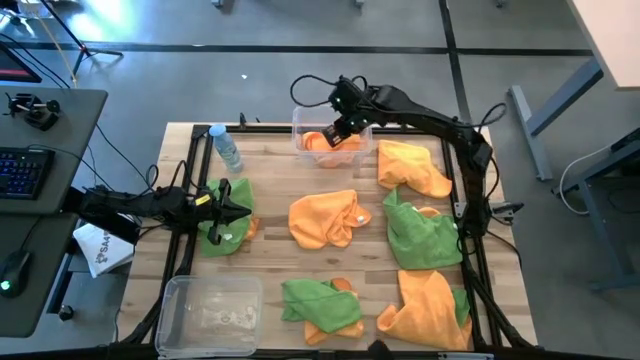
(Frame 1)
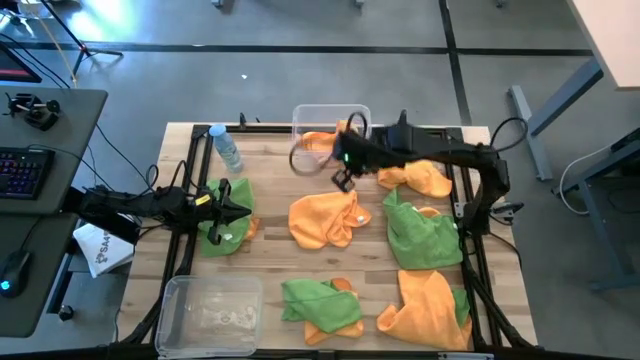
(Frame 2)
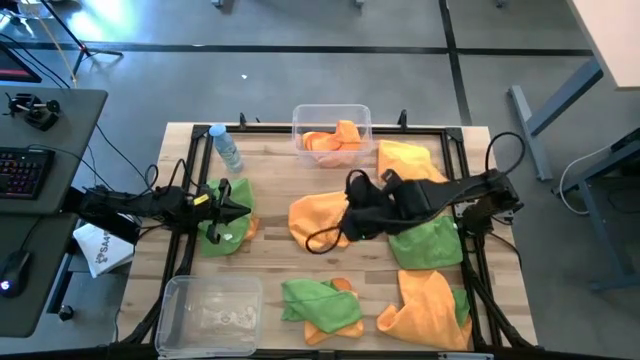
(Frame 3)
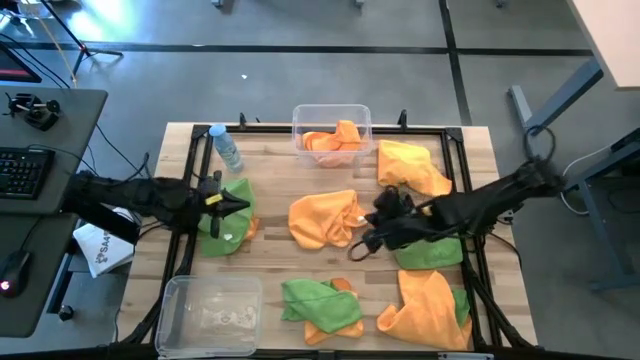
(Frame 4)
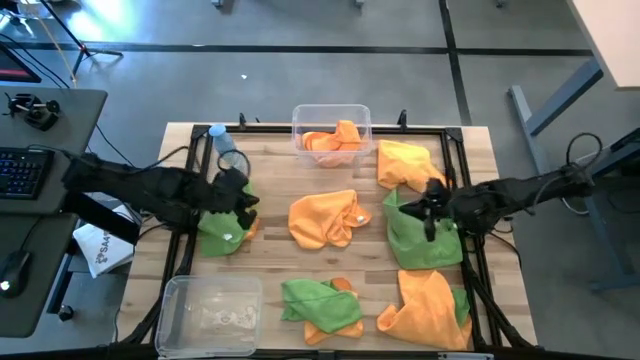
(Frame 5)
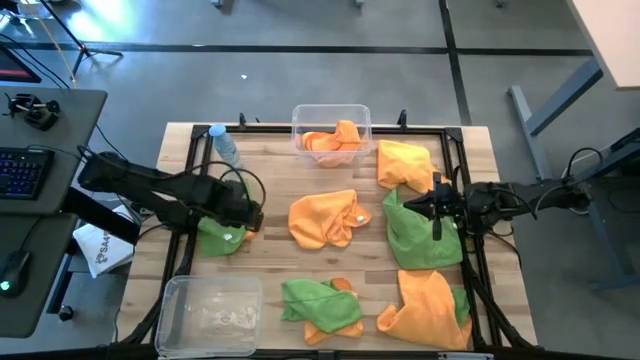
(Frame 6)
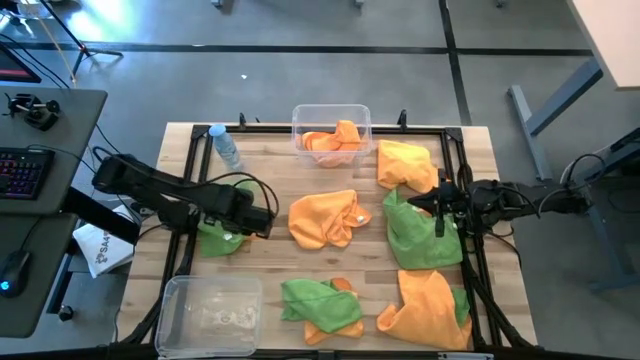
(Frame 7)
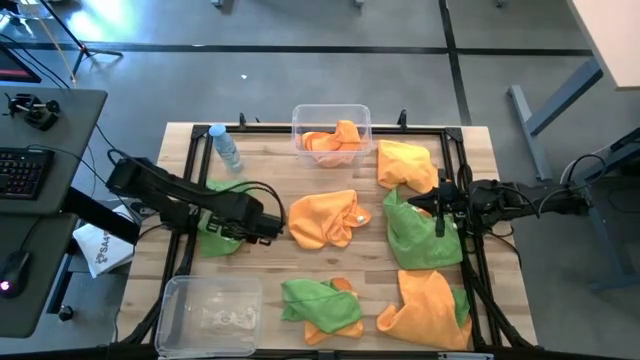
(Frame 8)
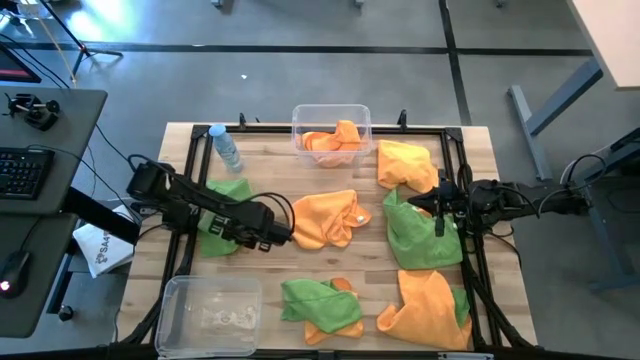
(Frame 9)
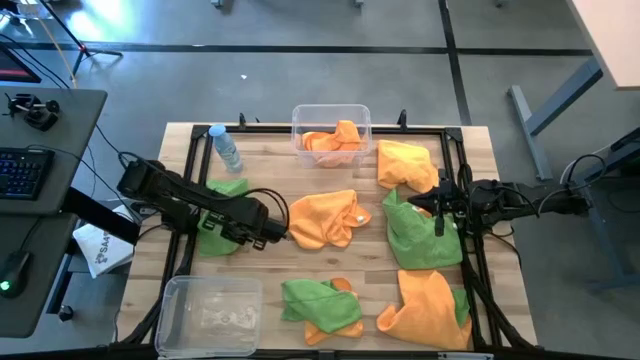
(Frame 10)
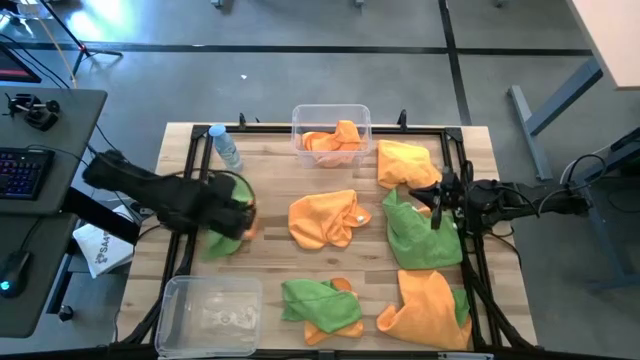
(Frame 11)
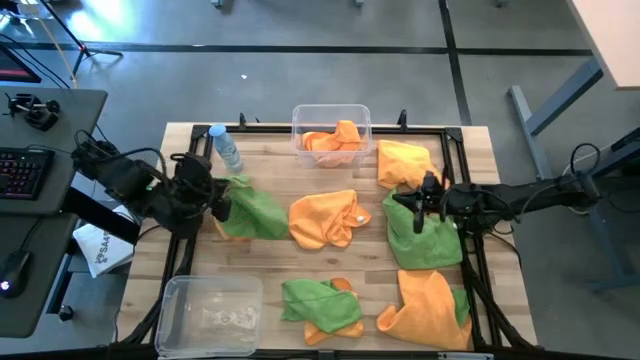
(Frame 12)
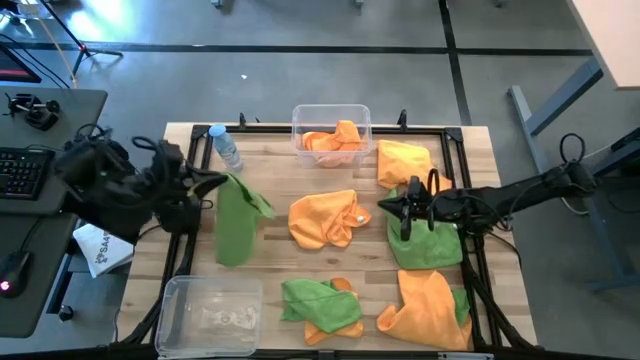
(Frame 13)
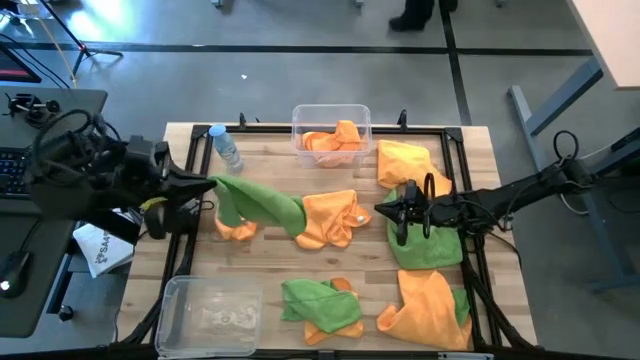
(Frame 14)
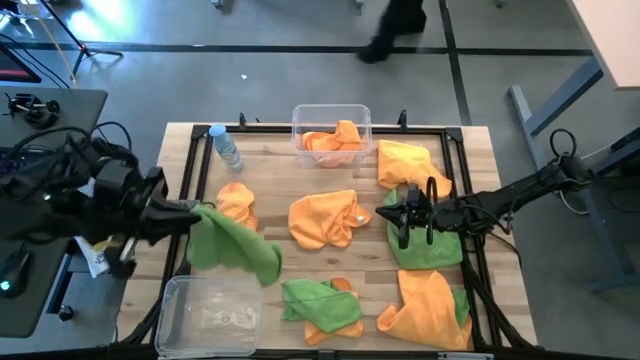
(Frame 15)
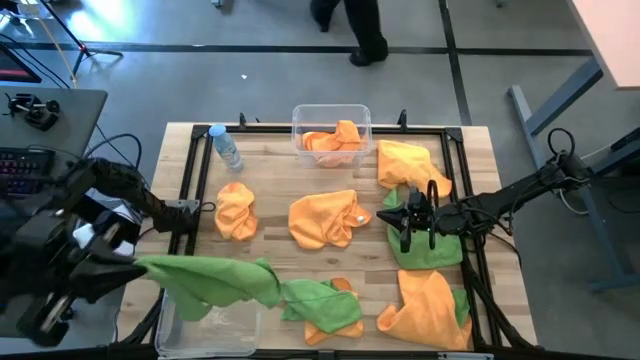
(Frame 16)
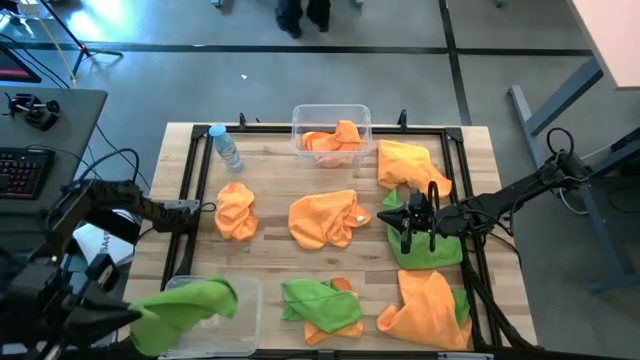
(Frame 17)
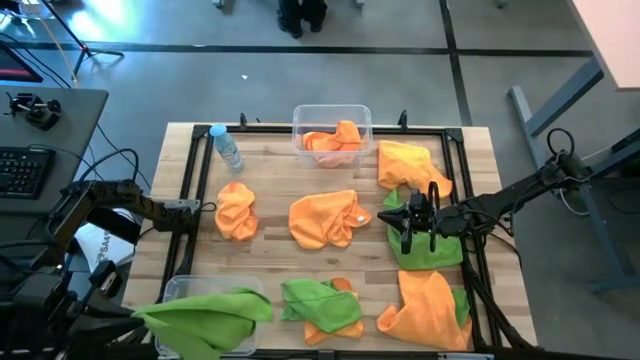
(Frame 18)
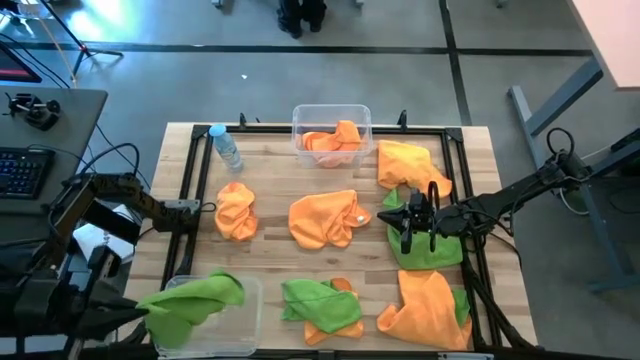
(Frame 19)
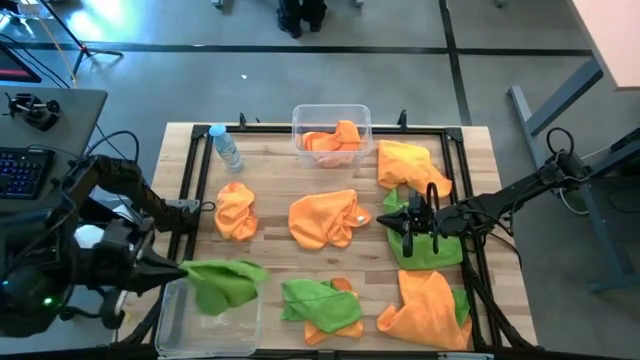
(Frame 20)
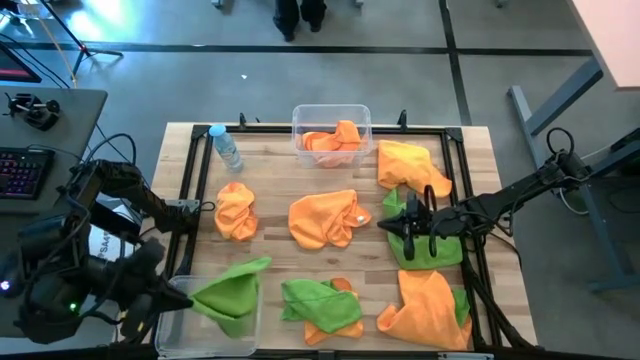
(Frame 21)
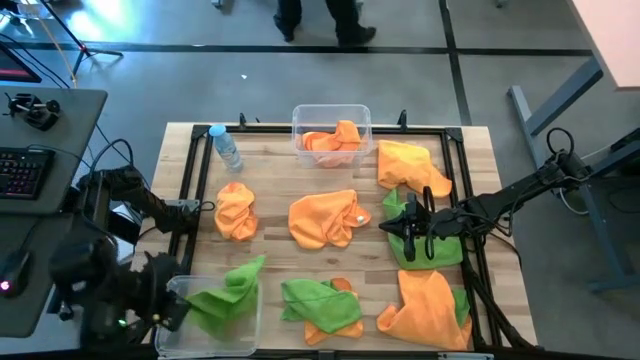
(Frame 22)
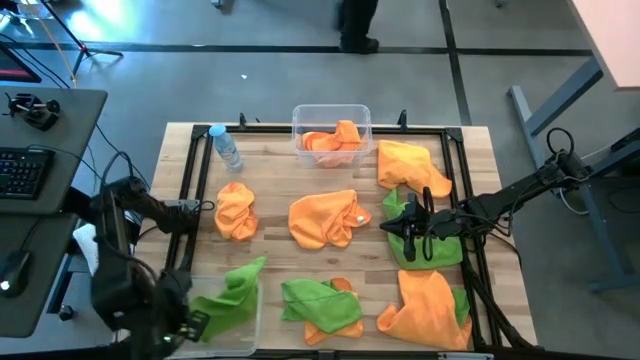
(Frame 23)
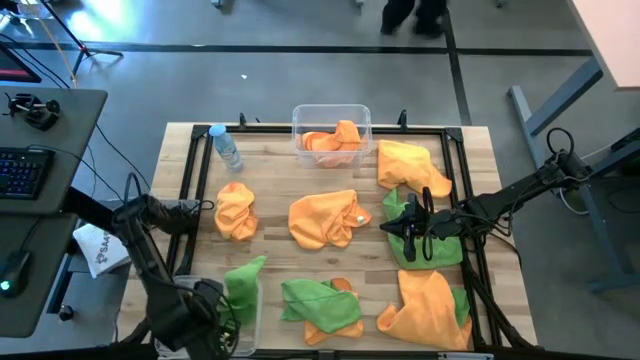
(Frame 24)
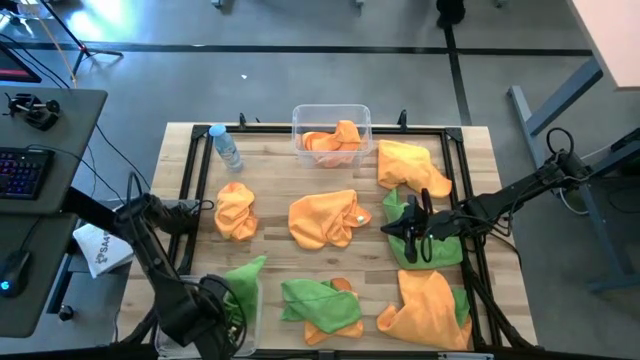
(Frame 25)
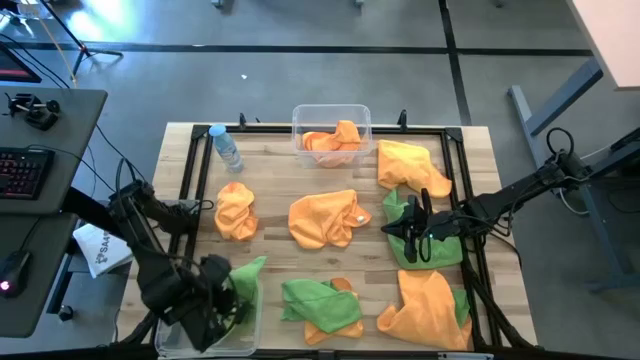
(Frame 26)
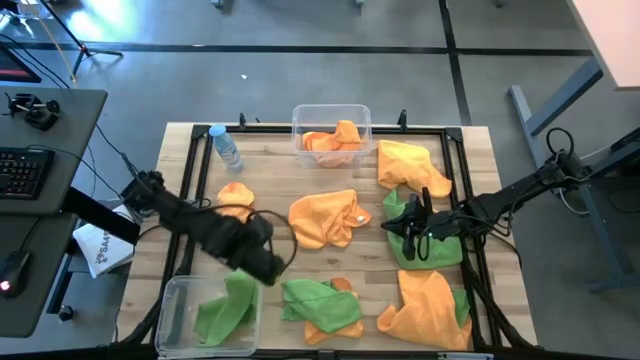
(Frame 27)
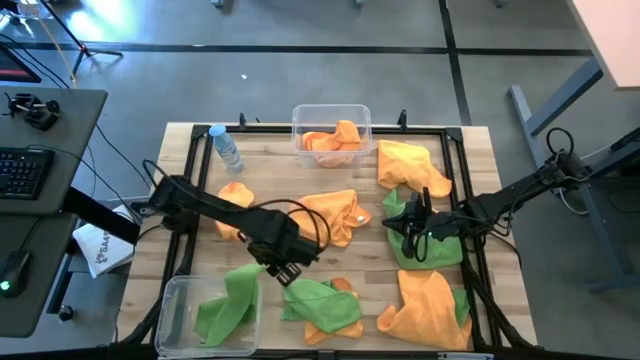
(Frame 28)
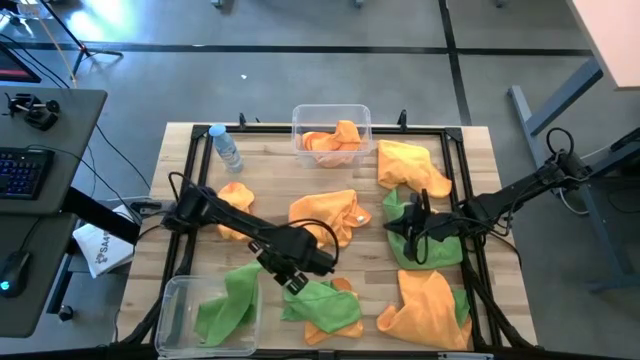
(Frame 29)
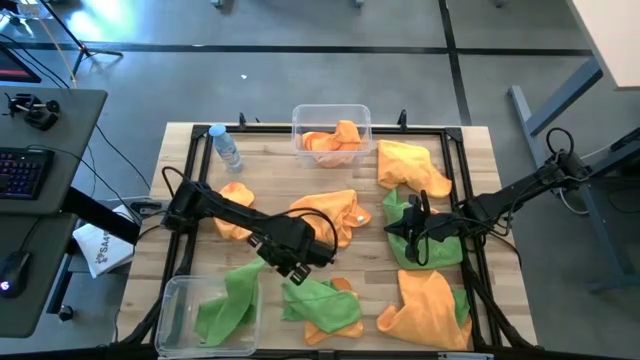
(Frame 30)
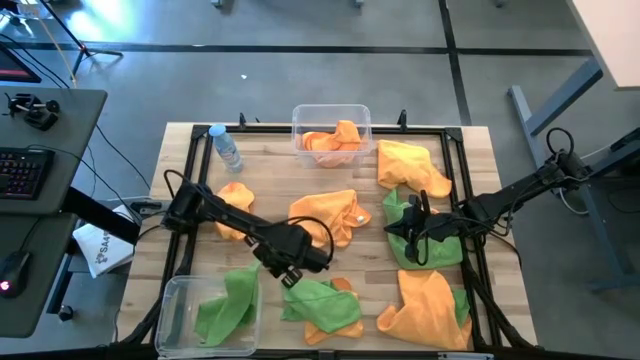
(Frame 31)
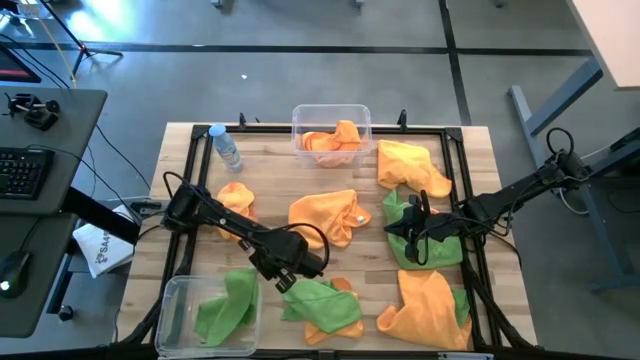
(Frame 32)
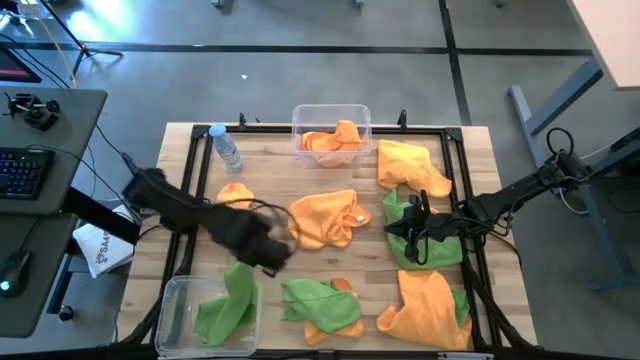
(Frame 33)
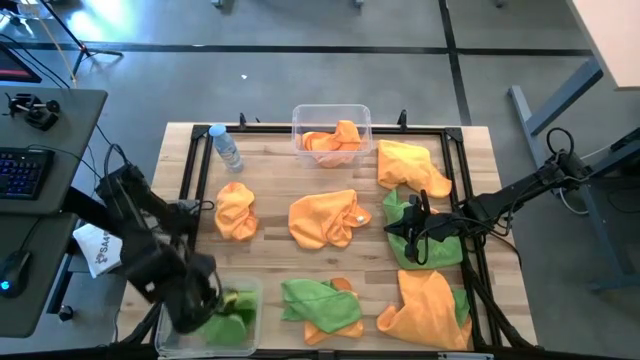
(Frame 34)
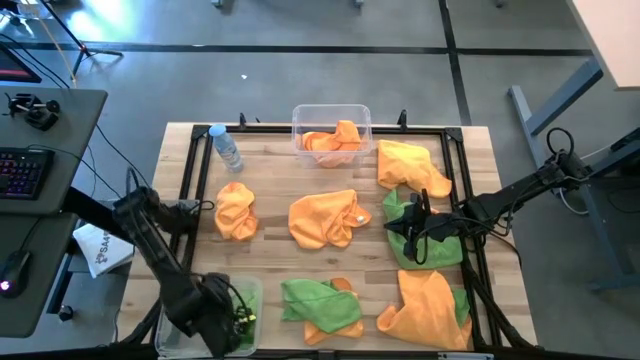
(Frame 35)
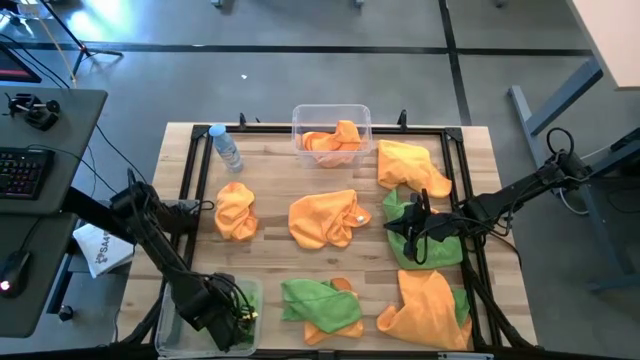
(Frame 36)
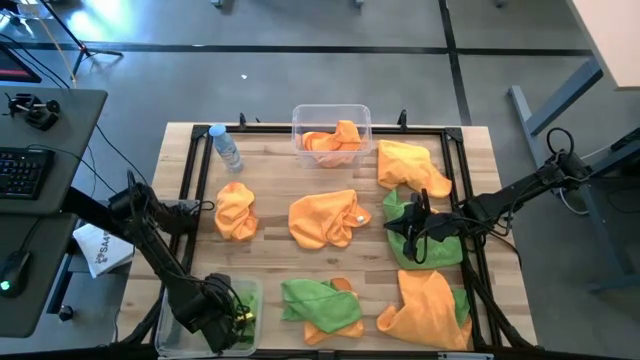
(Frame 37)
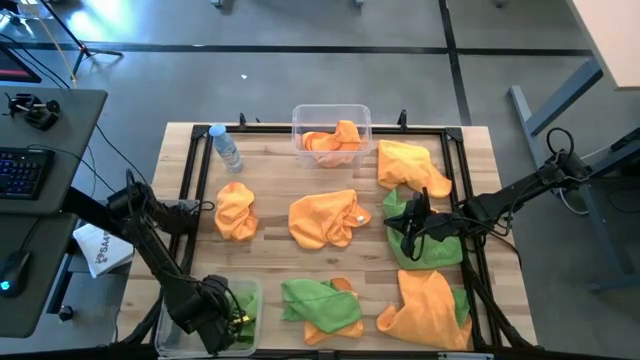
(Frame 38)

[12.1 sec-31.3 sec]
Task: Sort microfiber towel by color & place in baskets
Put the green towel into the bottom transparent bin
